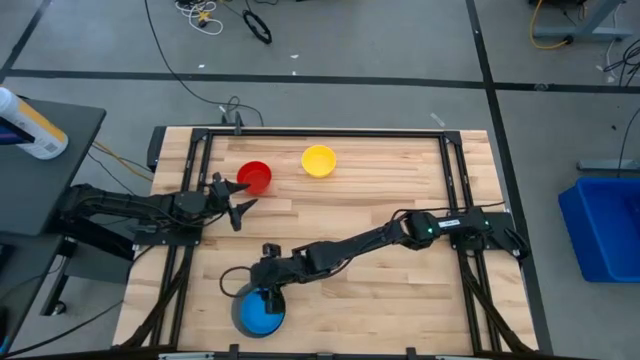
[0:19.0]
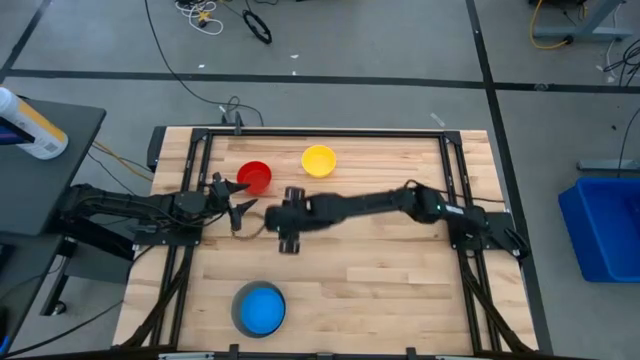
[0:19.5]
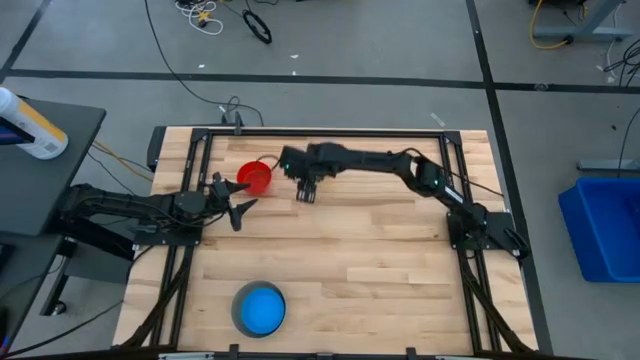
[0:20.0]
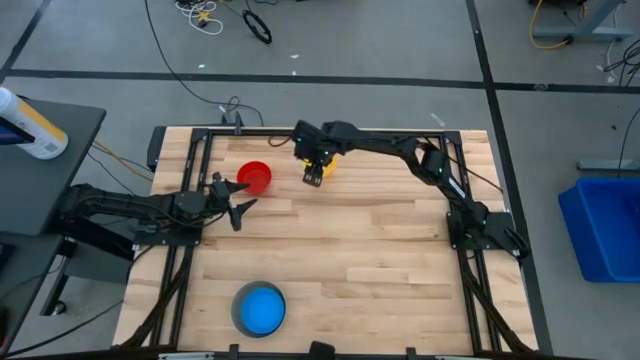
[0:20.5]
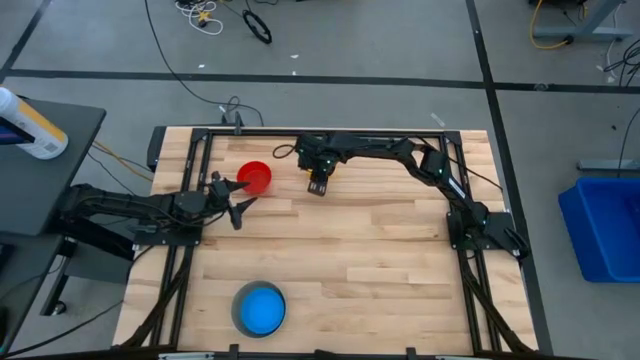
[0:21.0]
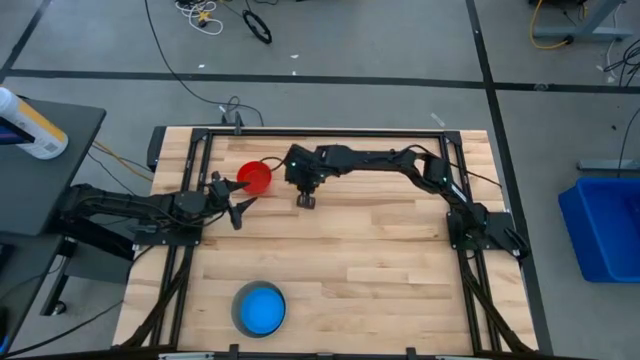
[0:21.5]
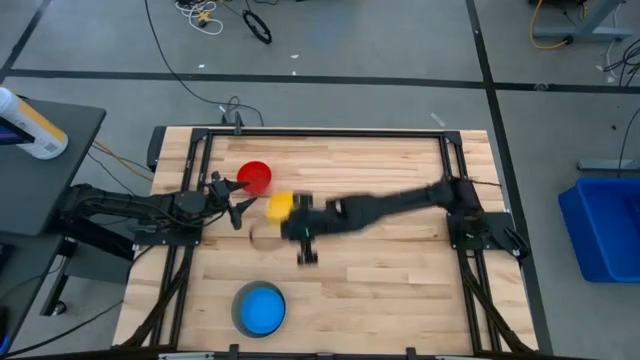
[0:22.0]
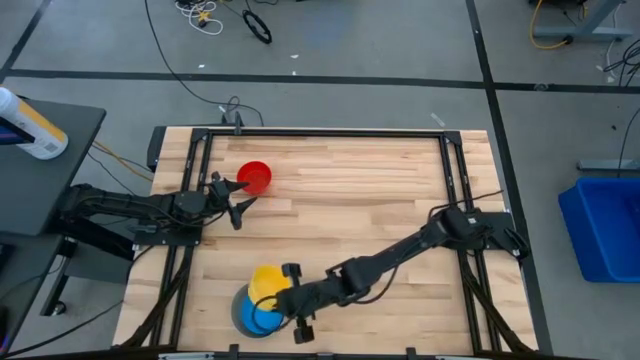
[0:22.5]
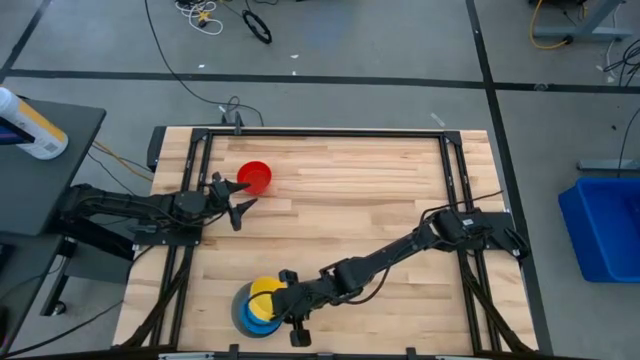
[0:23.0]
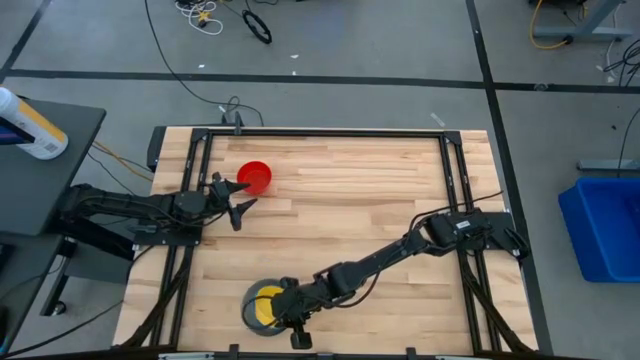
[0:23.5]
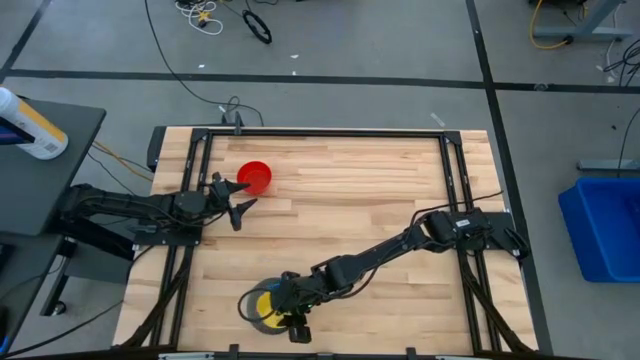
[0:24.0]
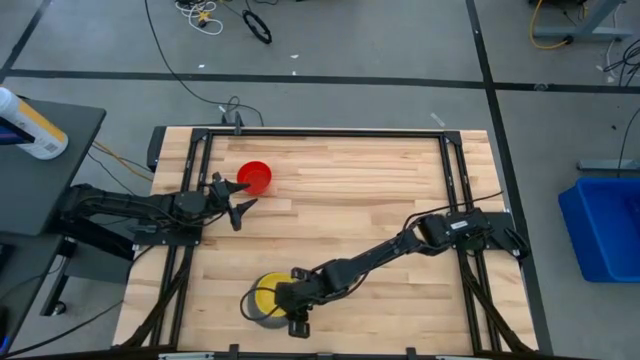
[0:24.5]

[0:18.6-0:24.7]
Stack the yellow bowl on top of the blue bowl

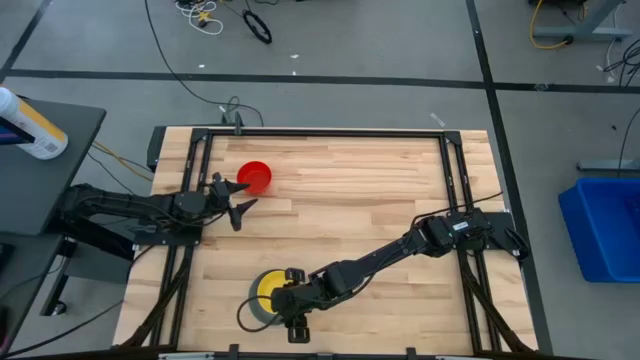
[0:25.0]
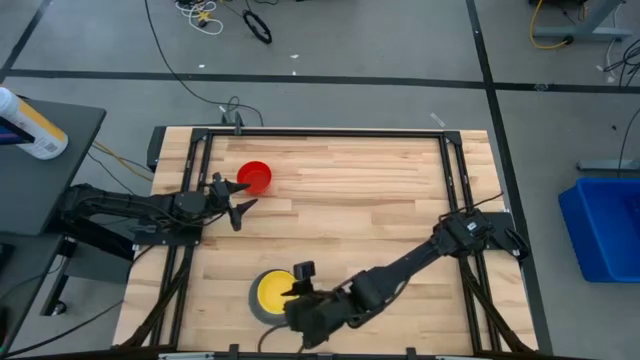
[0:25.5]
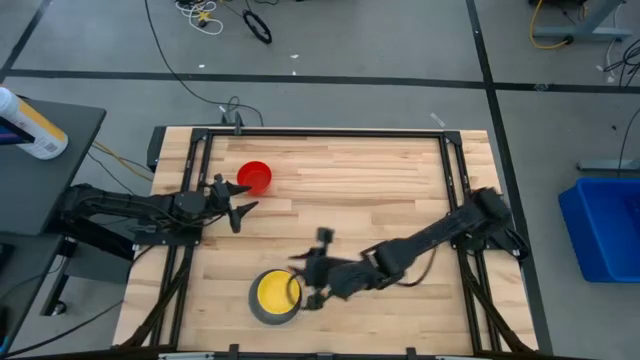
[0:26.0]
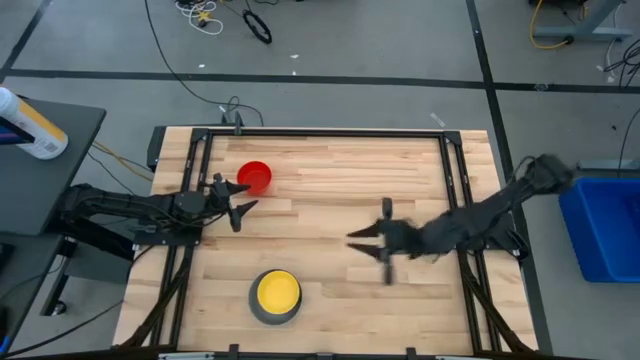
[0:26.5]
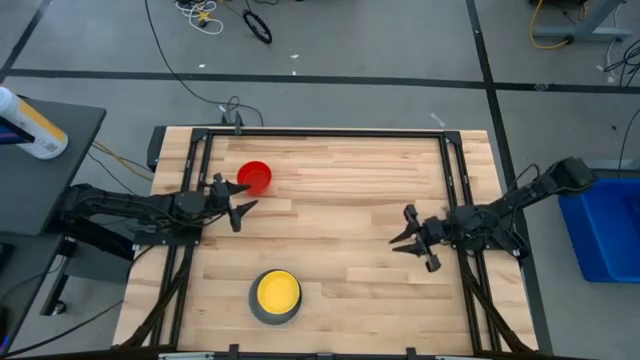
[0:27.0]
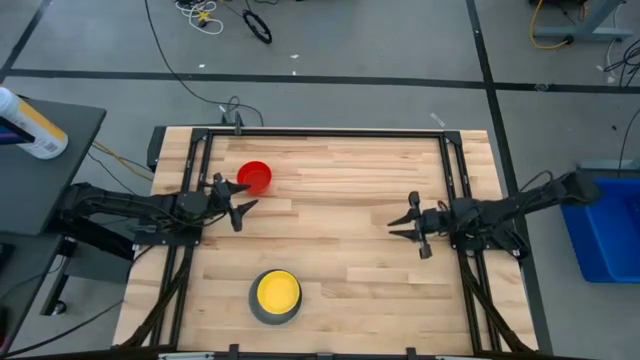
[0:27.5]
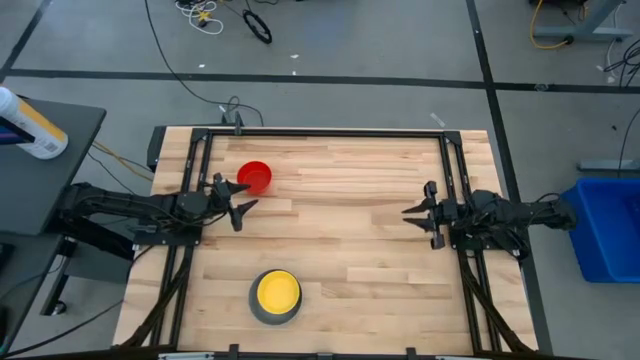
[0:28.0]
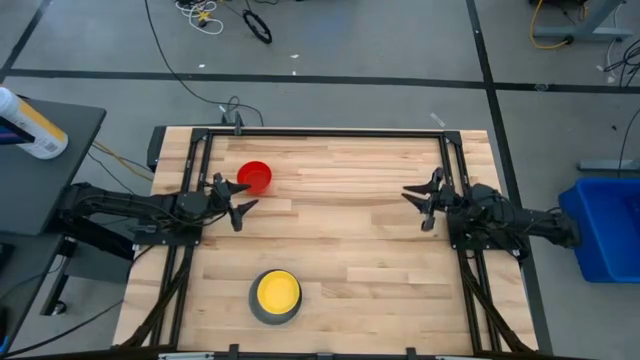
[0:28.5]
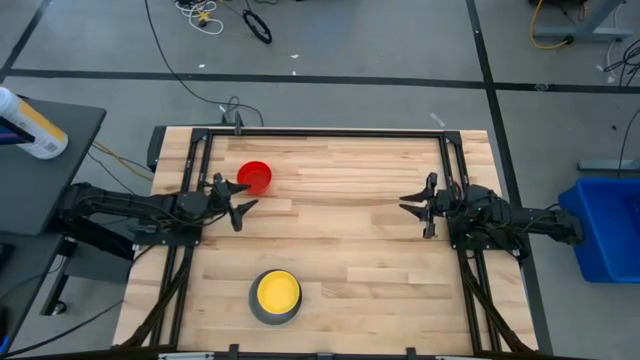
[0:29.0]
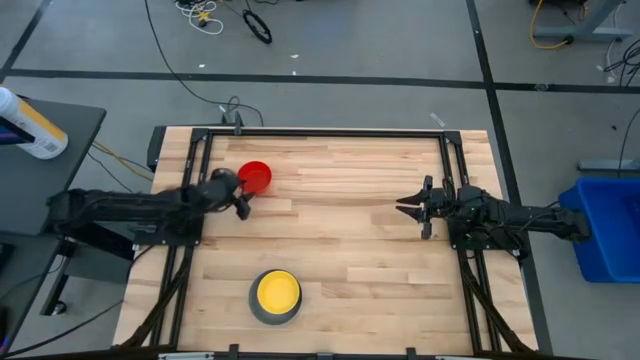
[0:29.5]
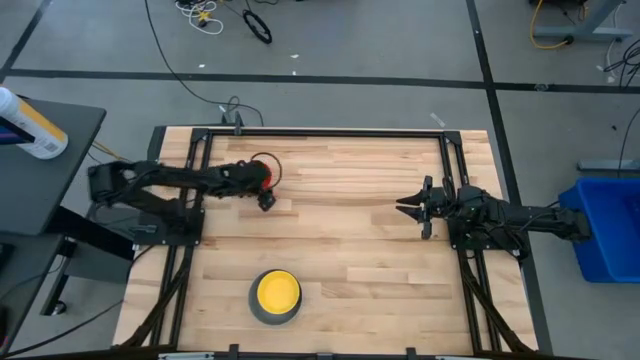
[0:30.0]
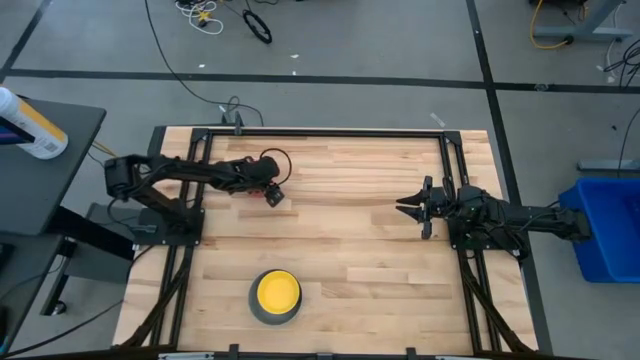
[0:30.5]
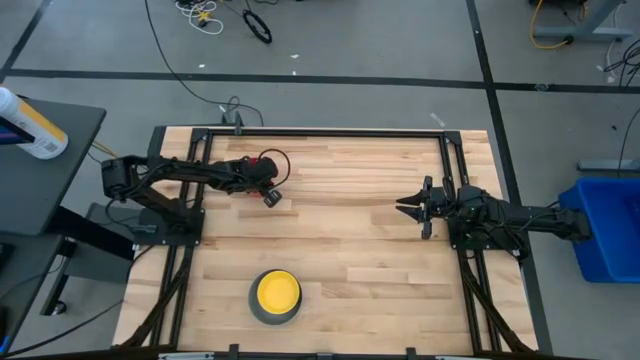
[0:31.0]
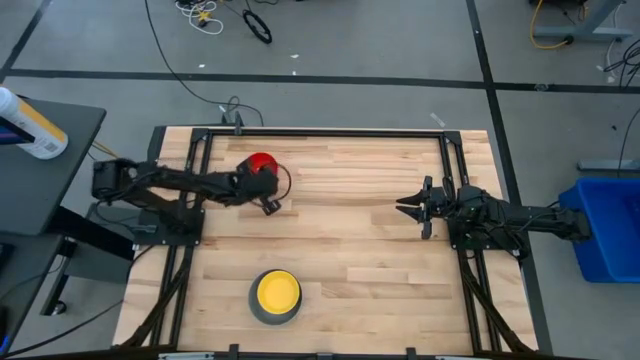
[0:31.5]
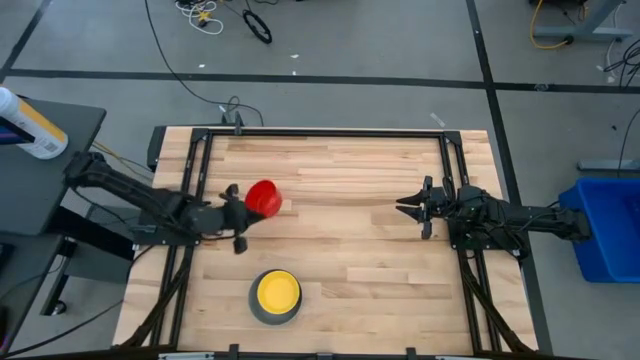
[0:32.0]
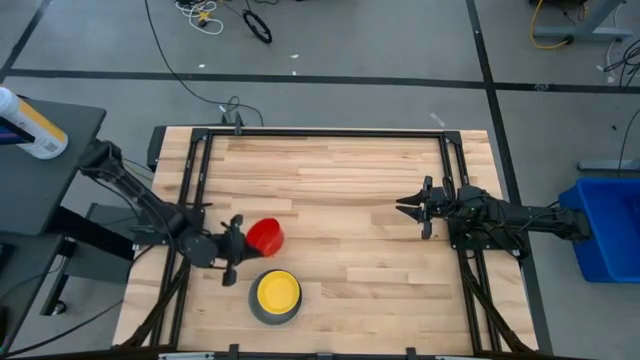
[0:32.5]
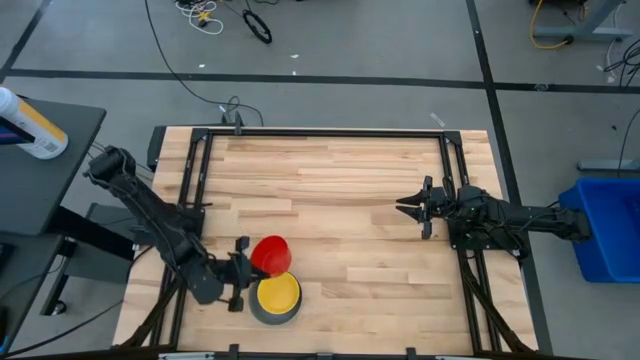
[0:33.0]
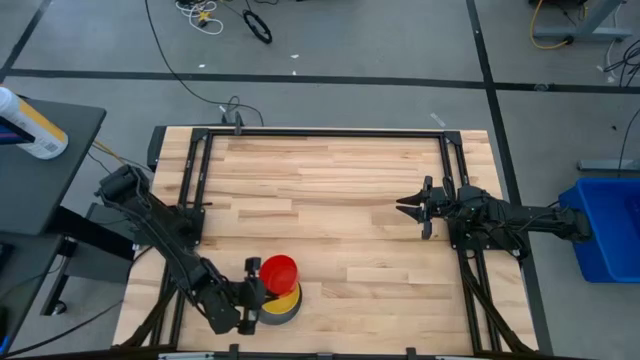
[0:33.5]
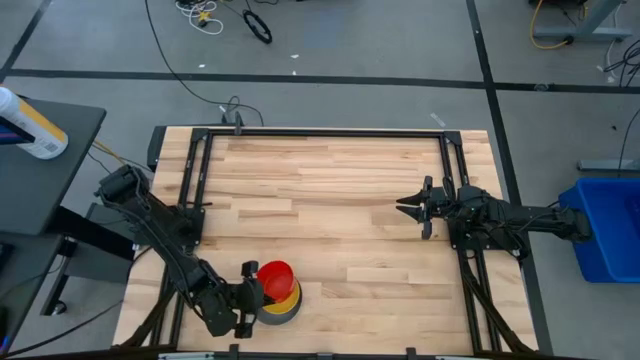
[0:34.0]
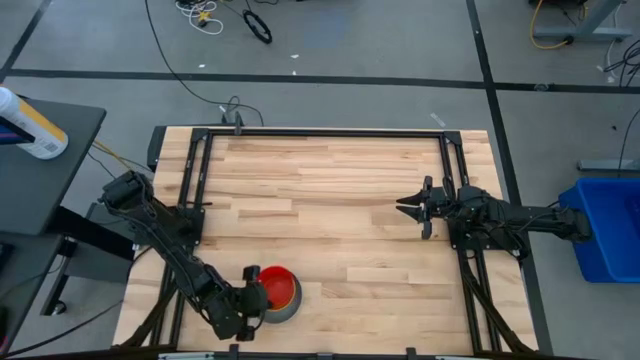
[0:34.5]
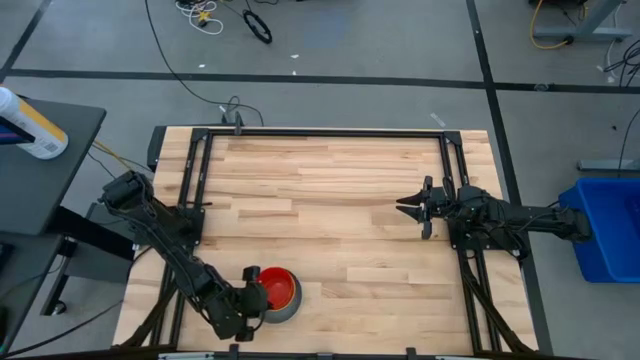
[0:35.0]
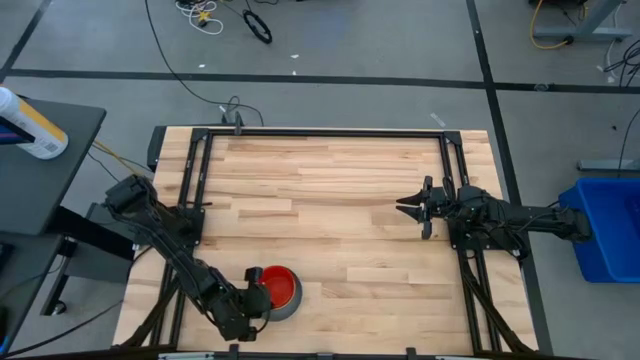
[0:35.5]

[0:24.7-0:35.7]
Stack the red bowl on top of the yellow bowl
